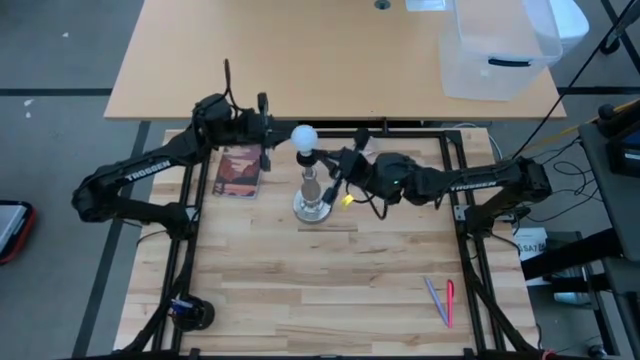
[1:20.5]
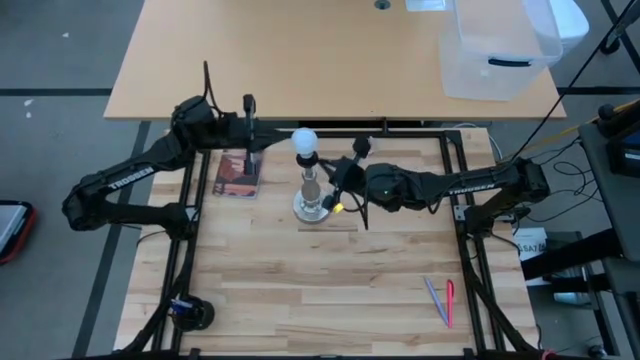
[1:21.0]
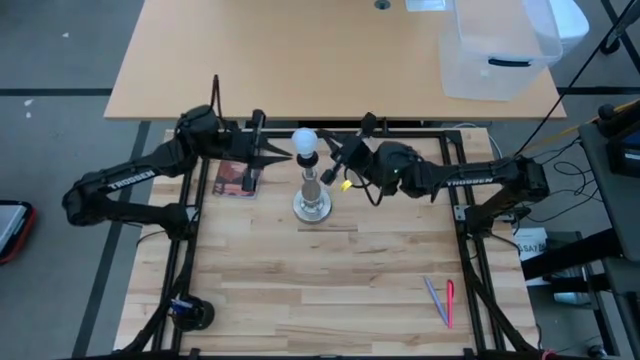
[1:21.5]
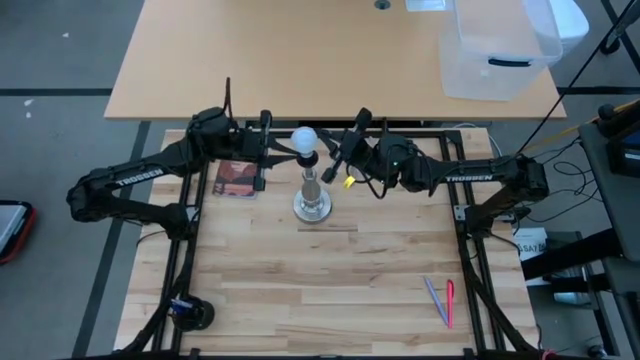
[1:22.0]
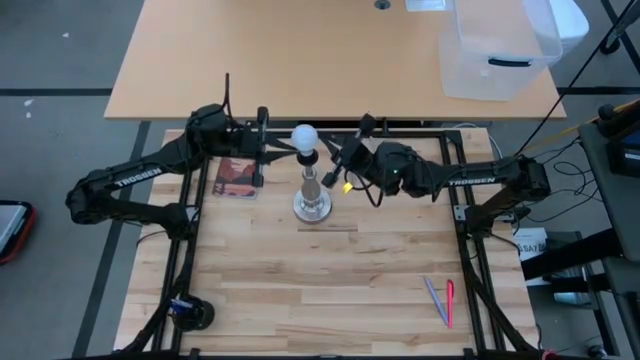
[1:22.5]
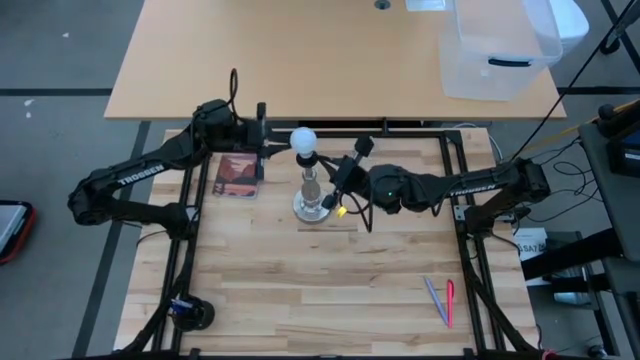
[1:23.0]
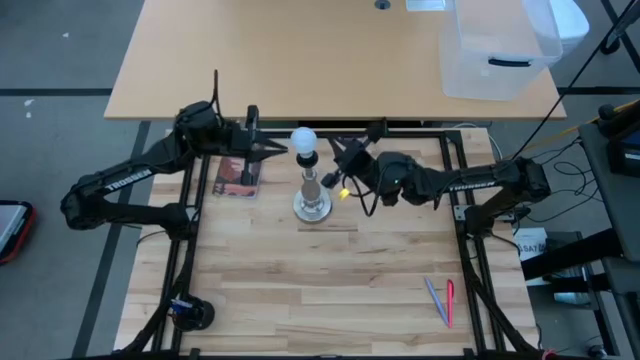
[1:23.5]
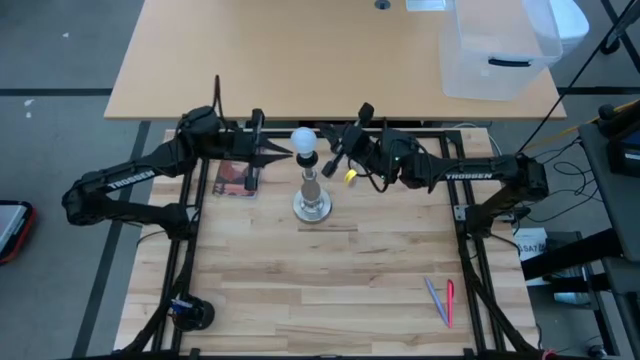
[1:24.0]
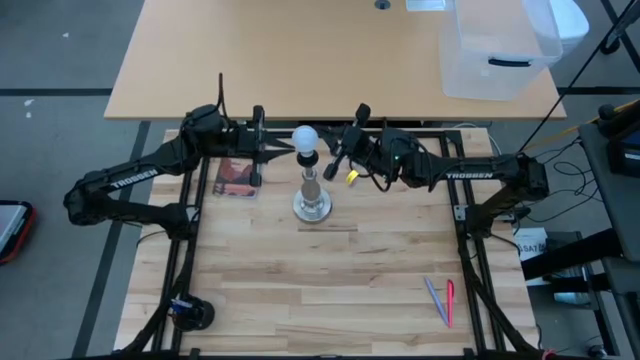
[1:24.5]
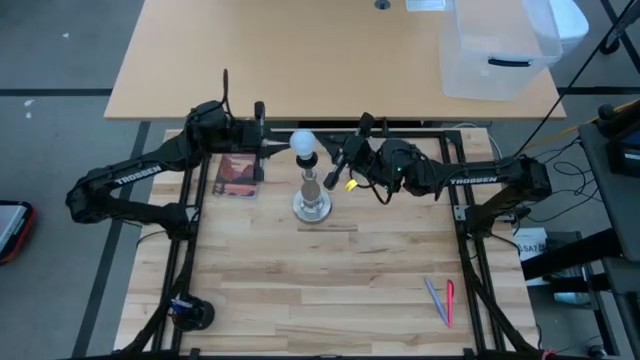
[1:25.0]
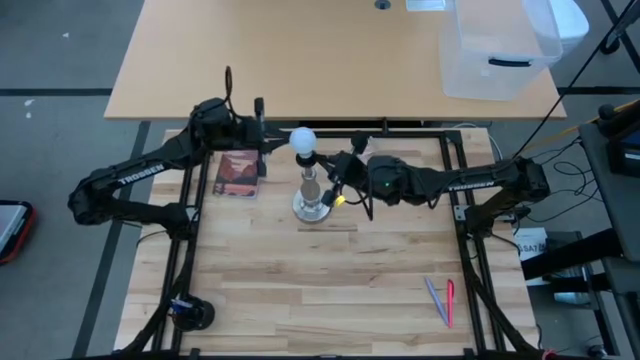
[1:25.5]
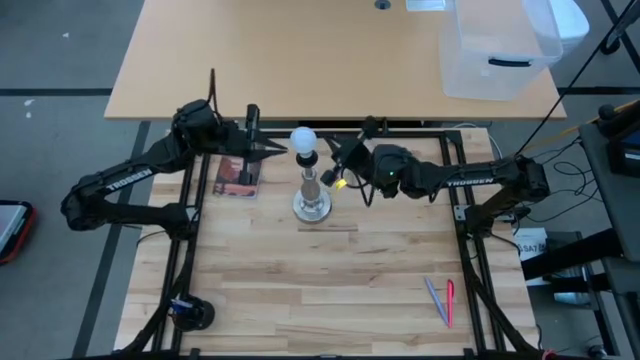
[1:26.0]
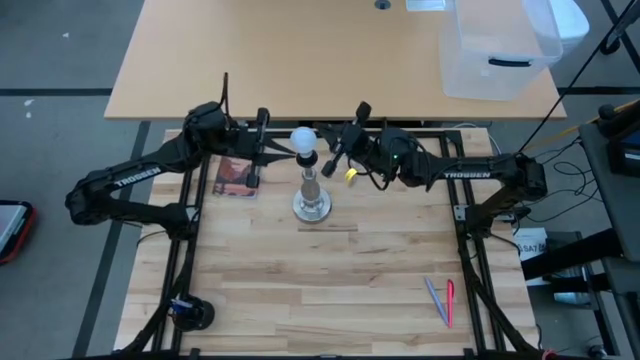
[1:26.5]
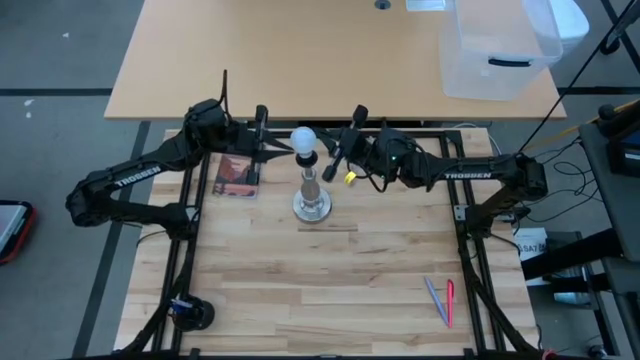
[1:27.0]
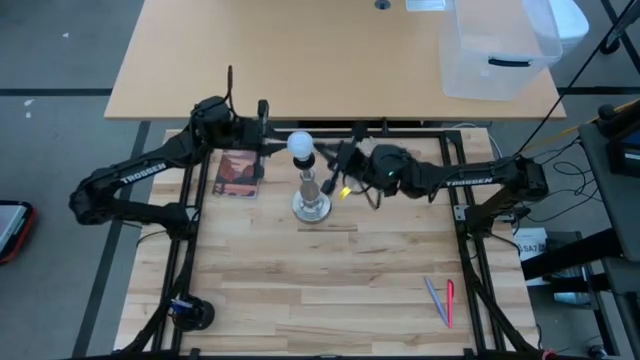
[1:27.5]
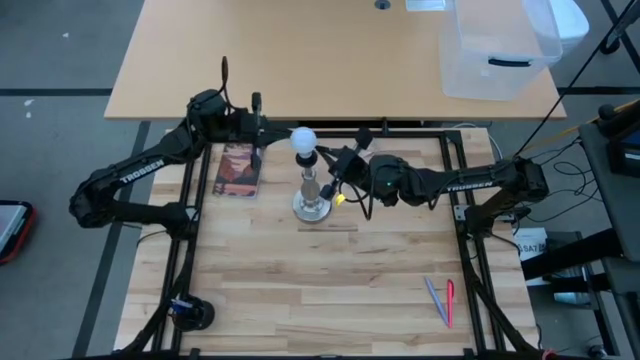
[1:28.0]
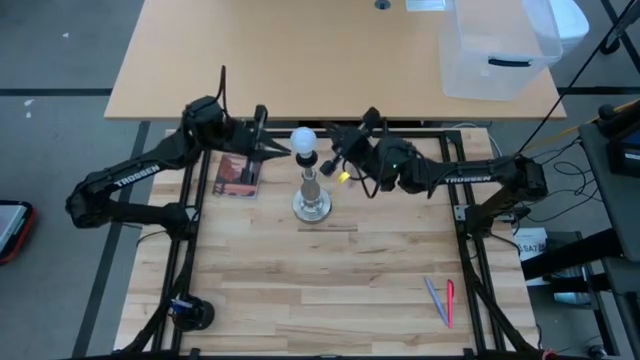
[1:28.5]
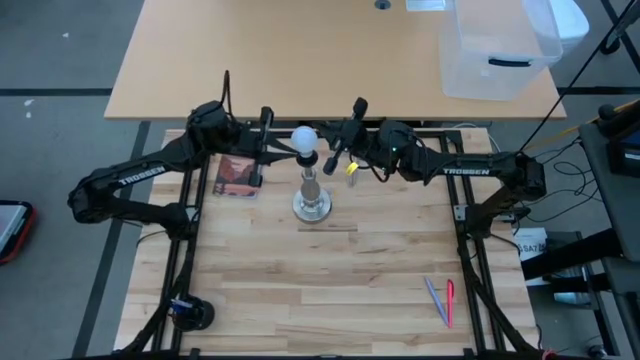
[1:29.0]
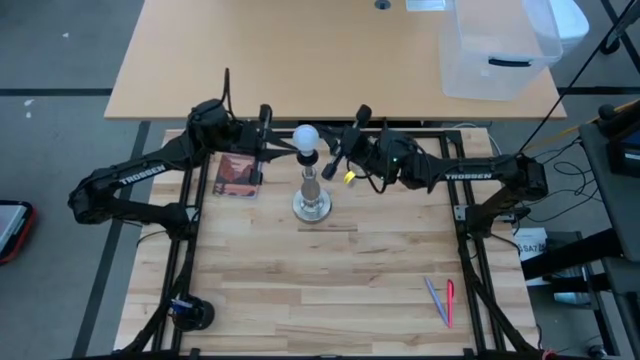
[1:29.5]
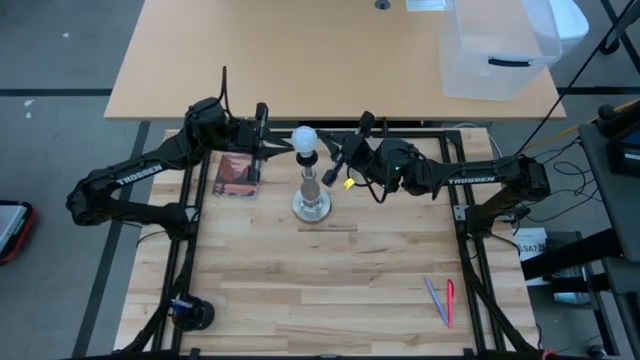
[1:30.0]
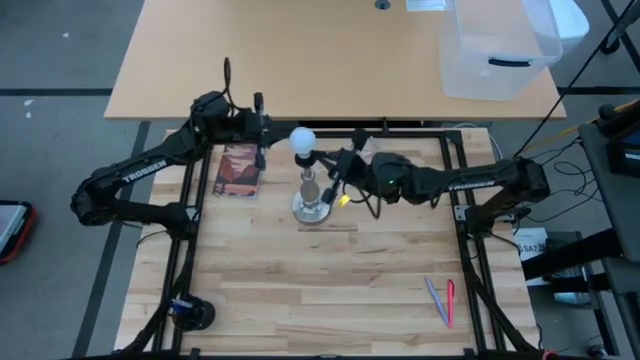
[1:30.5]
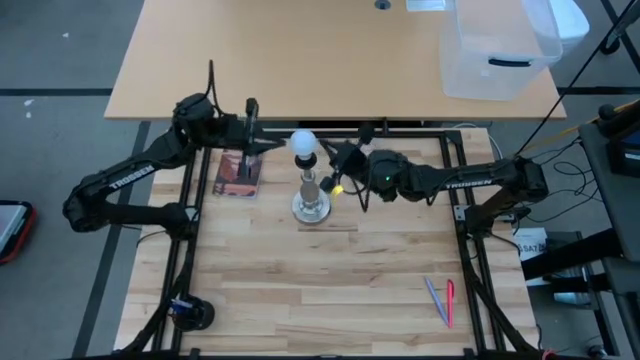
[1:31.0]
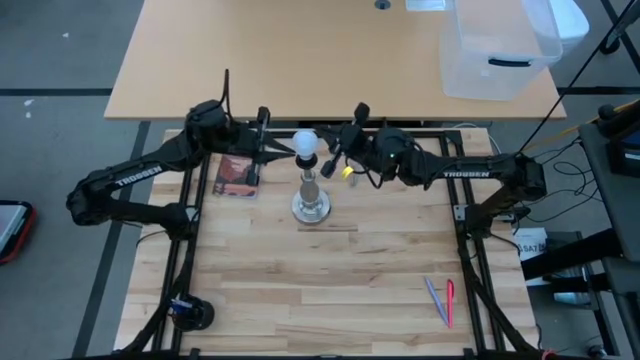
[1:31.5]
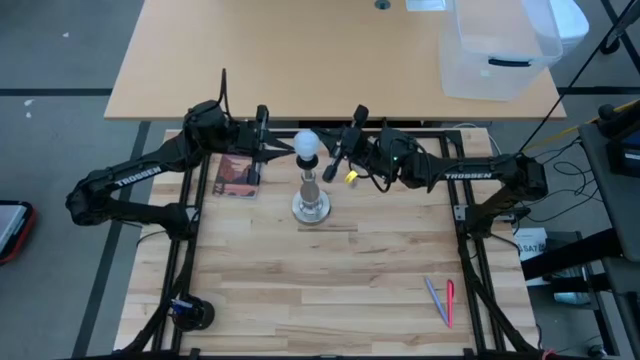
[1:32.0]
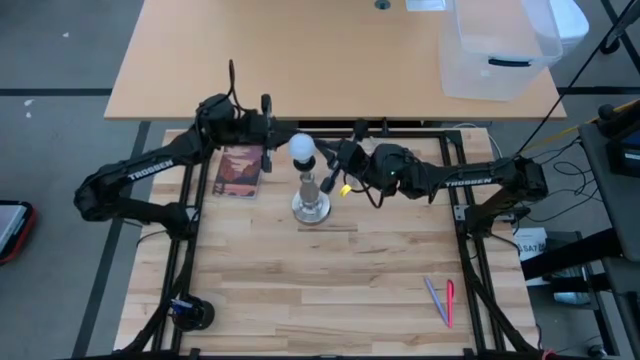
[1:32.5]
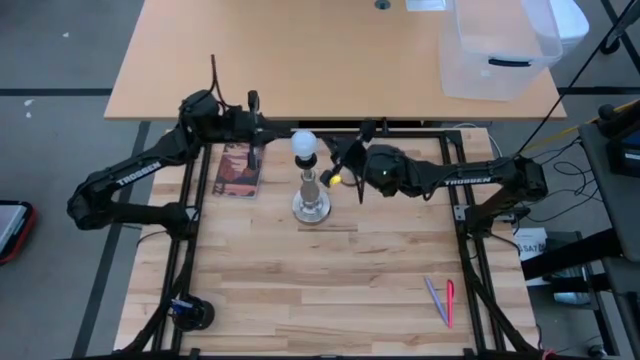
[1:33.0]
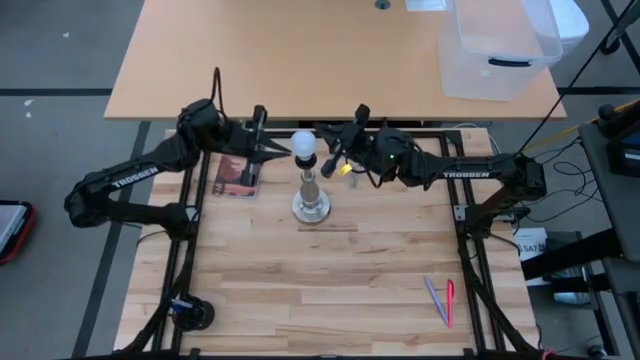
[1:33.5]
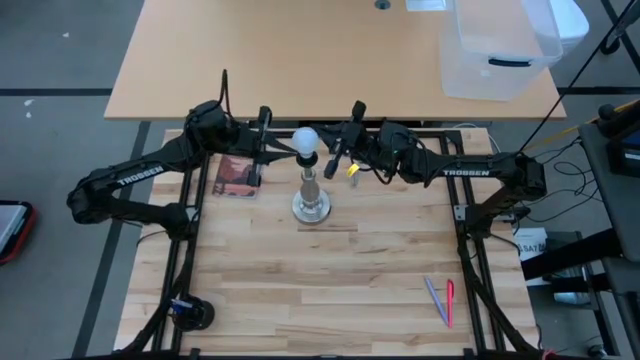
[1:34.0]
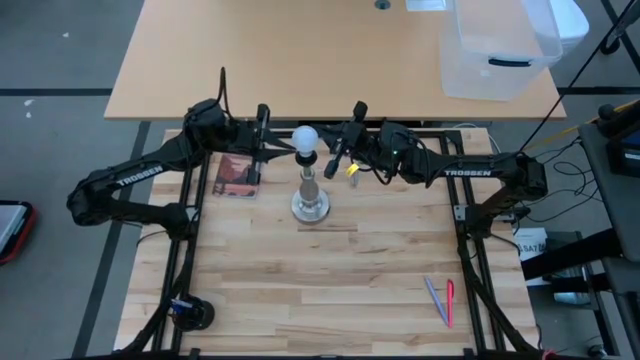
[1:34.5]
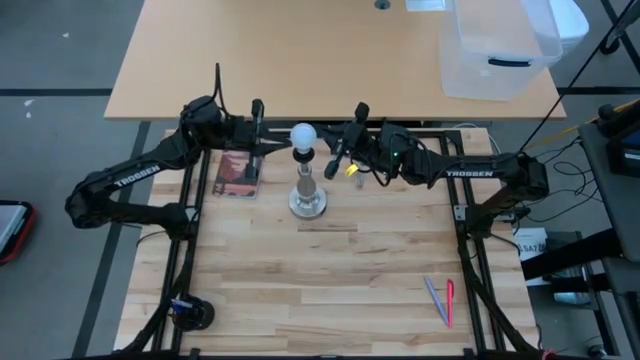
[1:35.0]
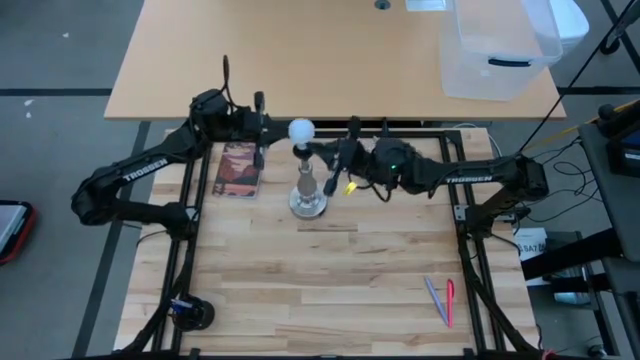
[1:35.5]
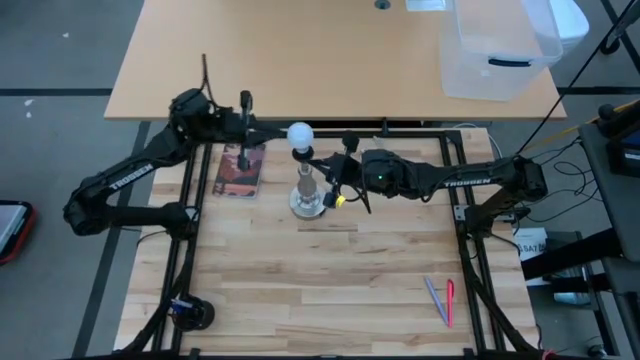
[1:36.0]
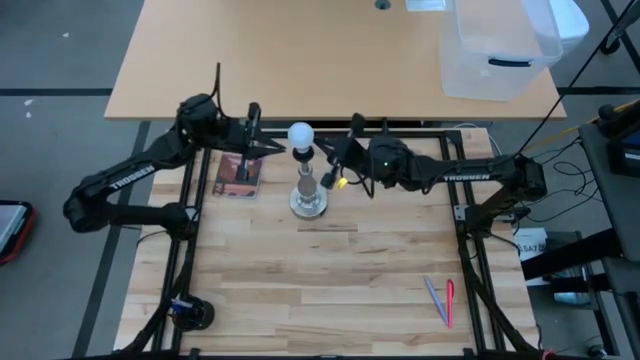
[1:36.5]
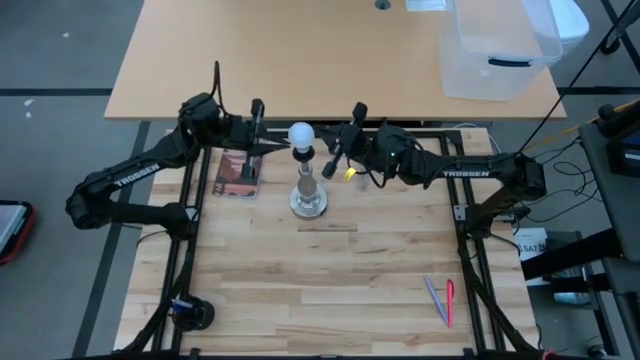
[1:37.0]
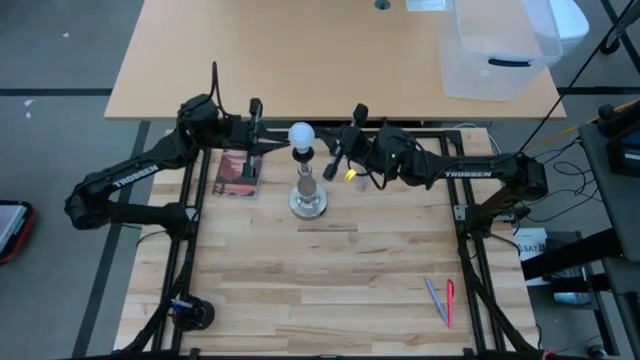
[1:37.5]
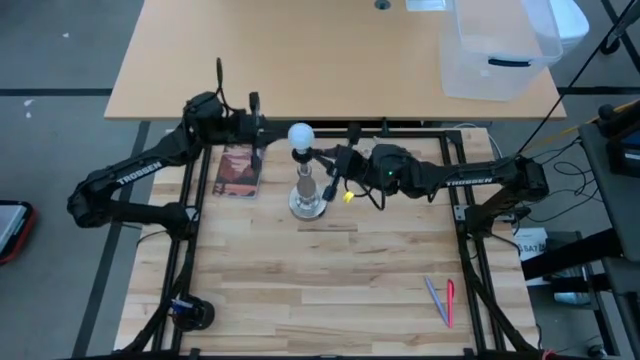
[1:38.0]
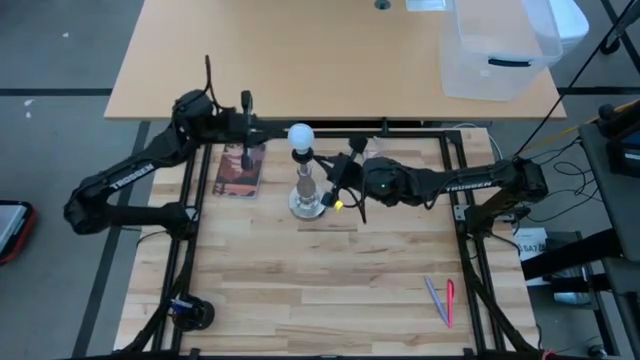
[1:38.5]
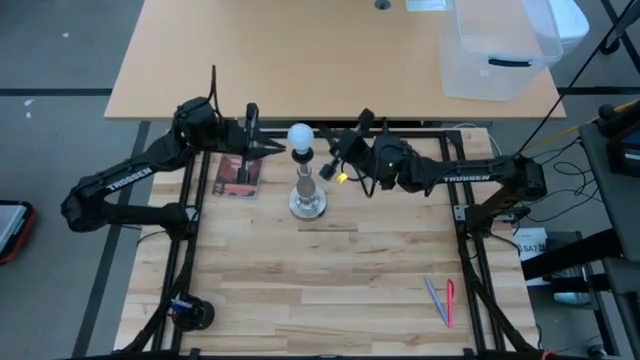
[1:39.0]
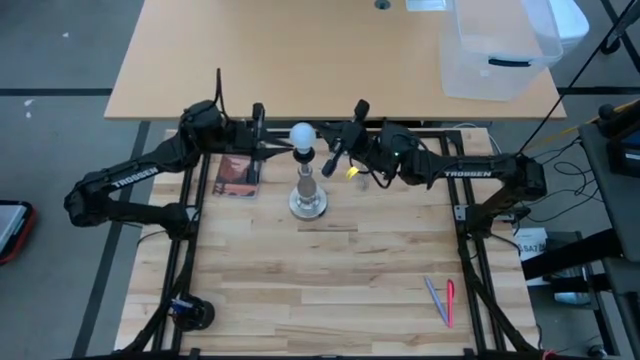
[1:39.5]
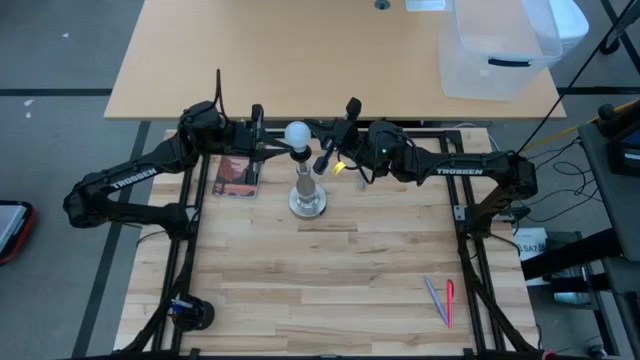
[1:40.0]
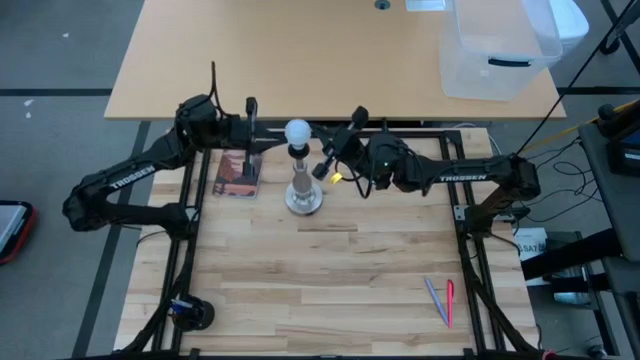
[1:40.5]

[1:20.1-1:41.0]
Task: Screw lightbulb
Insert the white lightbulb into the silver lamp

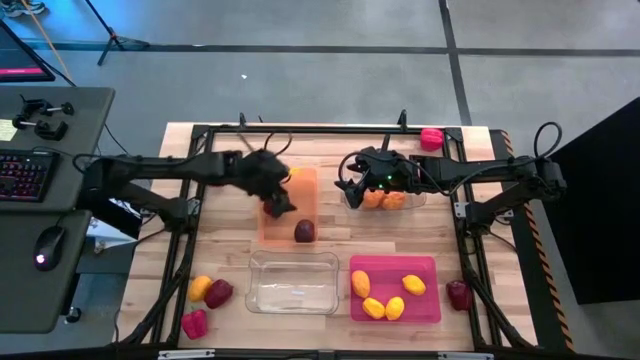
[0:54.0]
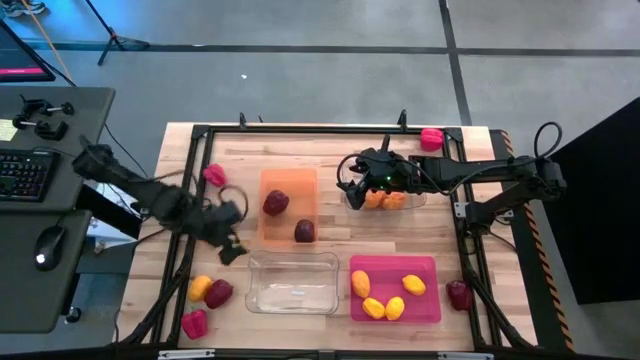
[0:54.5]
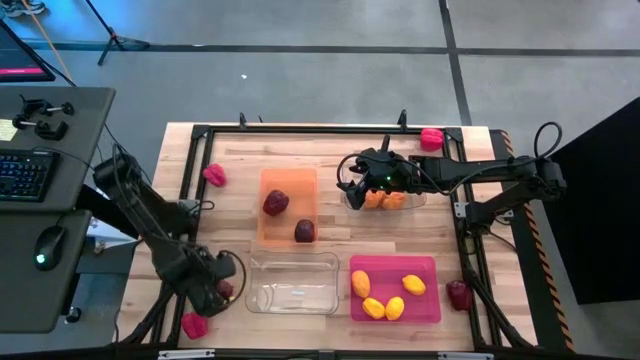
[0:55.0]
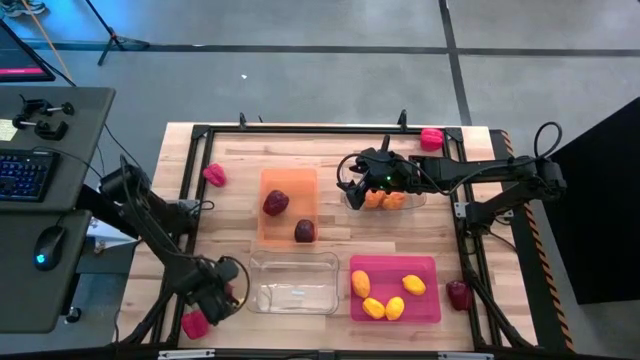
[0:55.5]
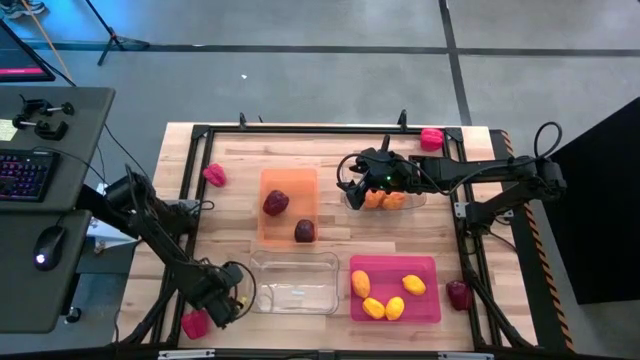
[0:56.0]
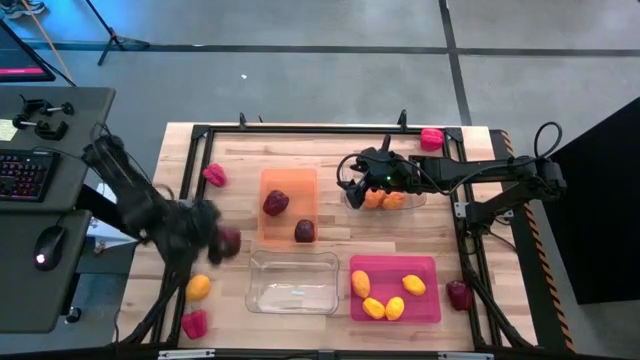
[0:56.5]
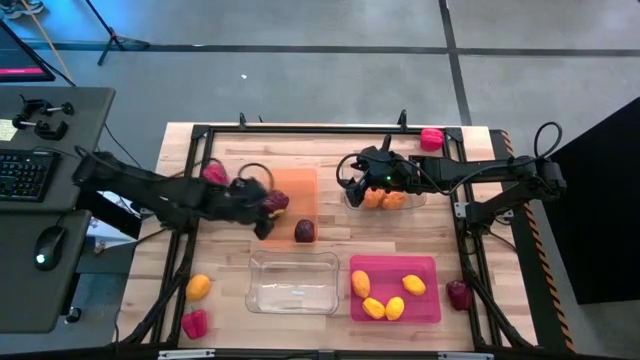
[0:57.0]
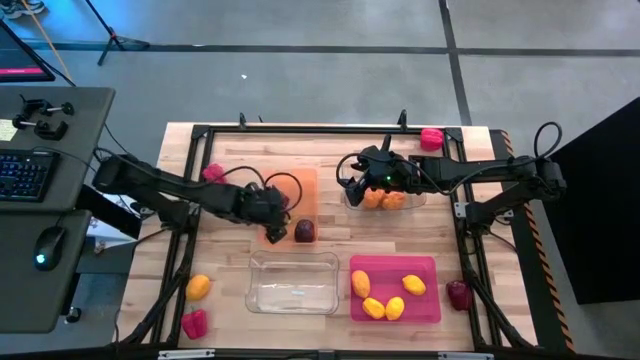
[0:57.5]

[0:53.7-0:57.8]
Task: Sort produce into baskets
Put the left apple into the orange bin
